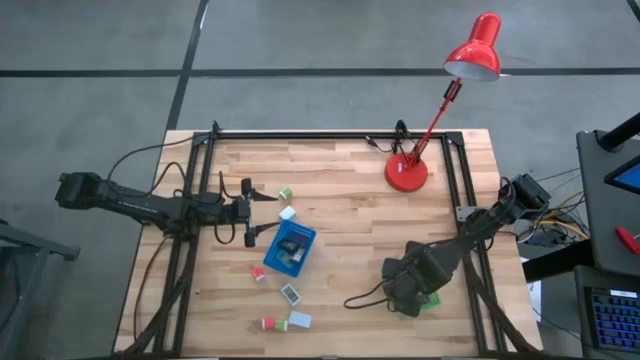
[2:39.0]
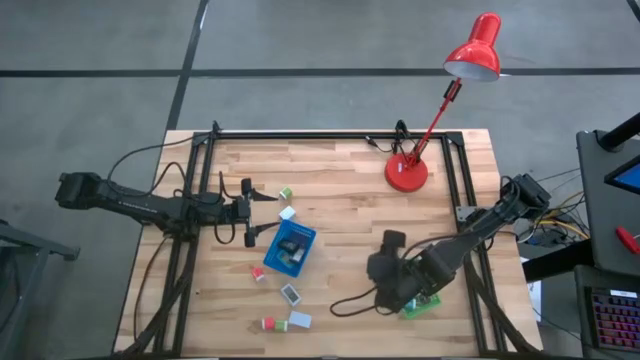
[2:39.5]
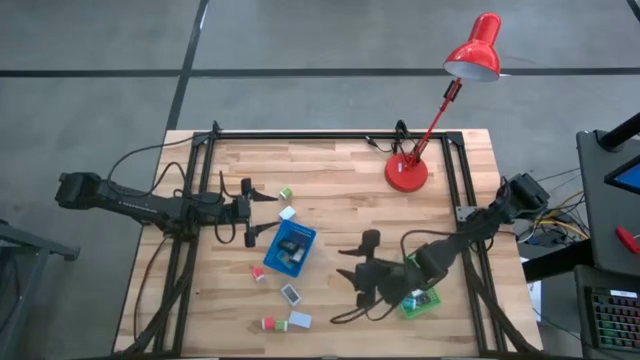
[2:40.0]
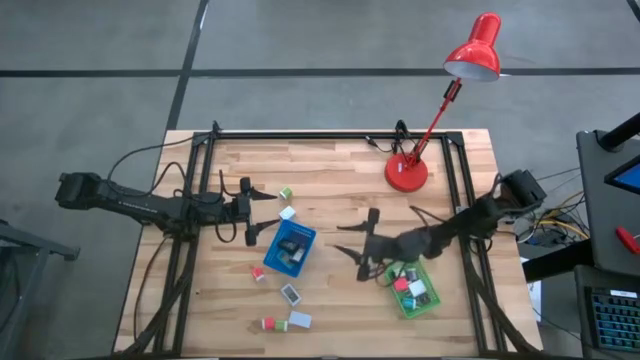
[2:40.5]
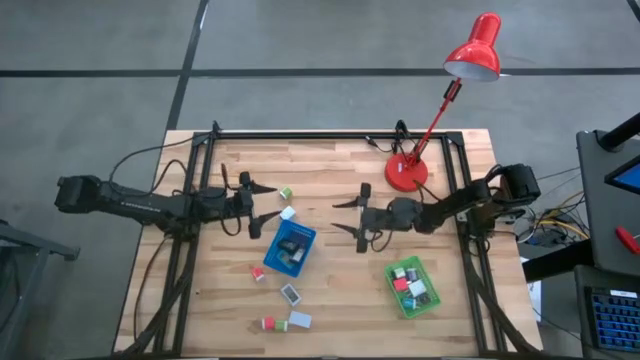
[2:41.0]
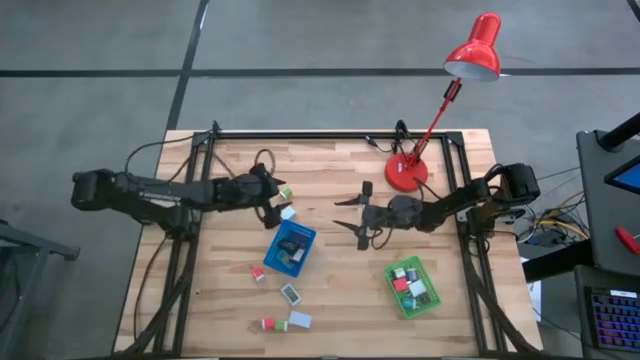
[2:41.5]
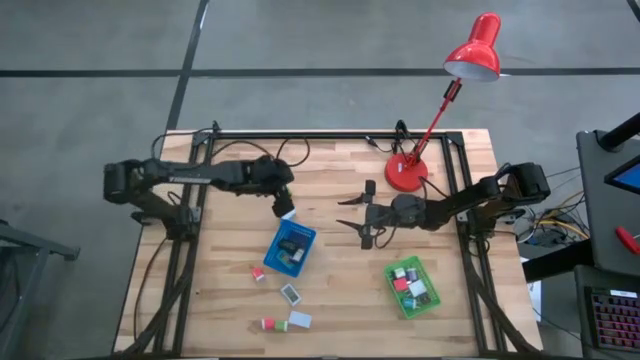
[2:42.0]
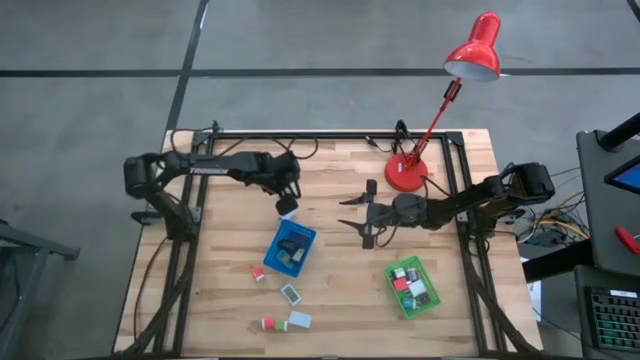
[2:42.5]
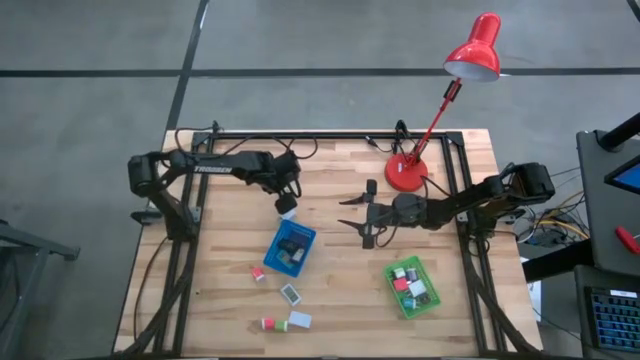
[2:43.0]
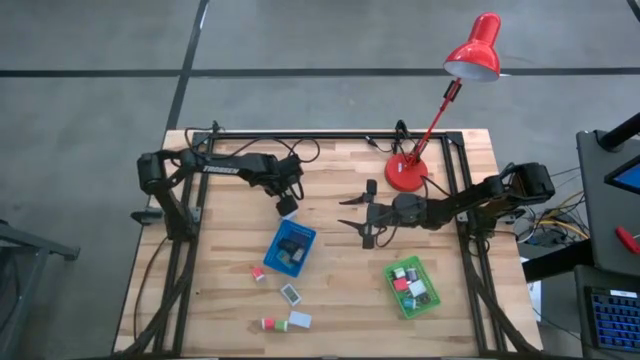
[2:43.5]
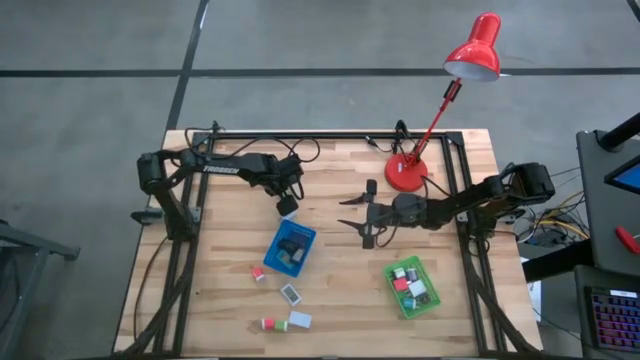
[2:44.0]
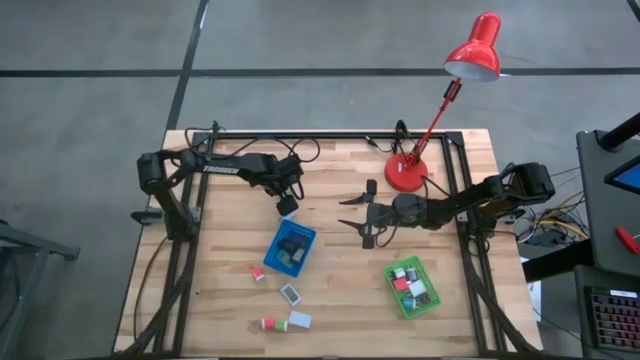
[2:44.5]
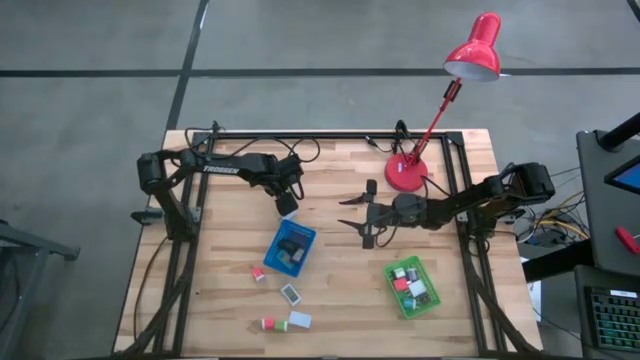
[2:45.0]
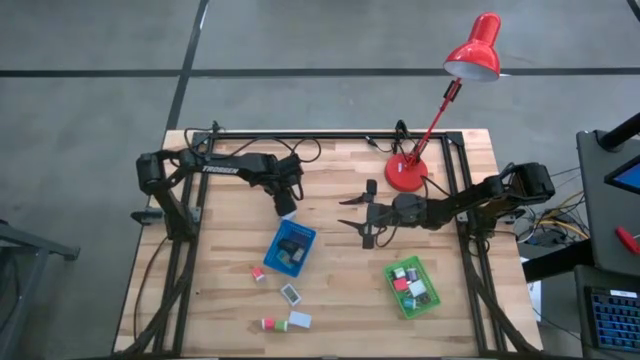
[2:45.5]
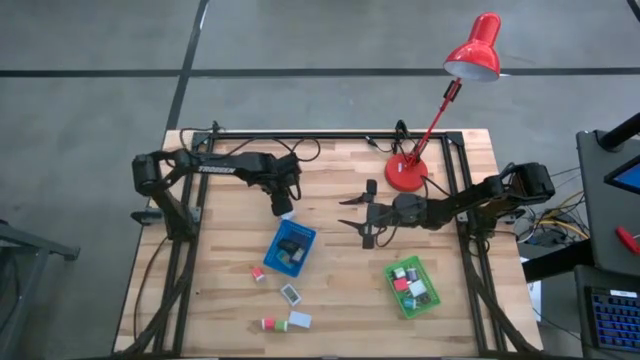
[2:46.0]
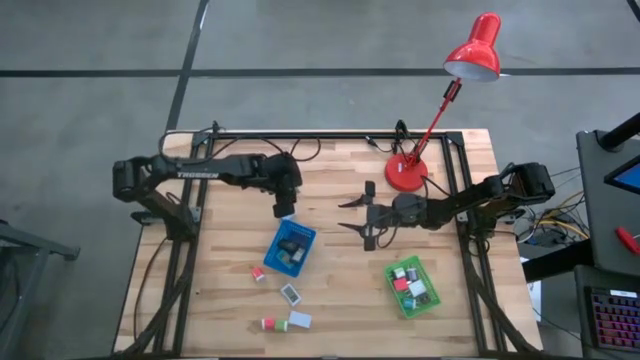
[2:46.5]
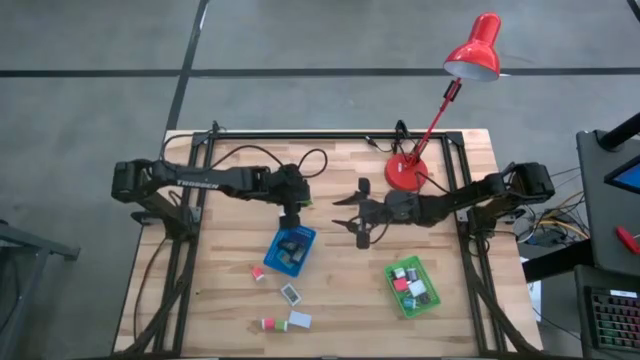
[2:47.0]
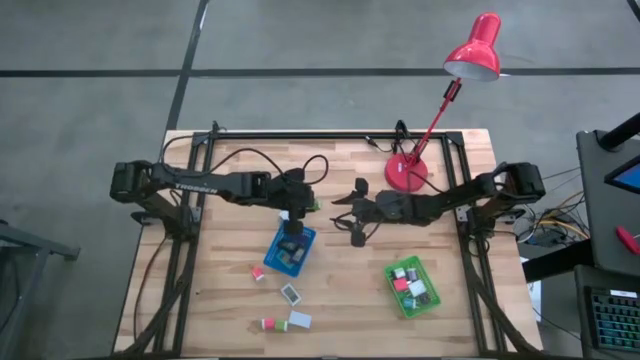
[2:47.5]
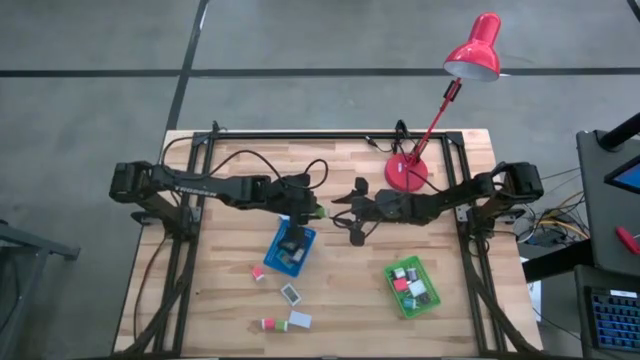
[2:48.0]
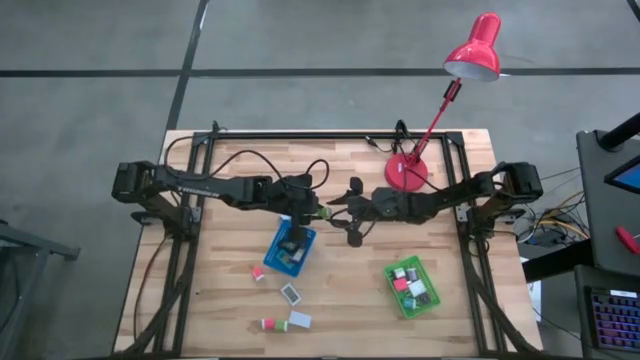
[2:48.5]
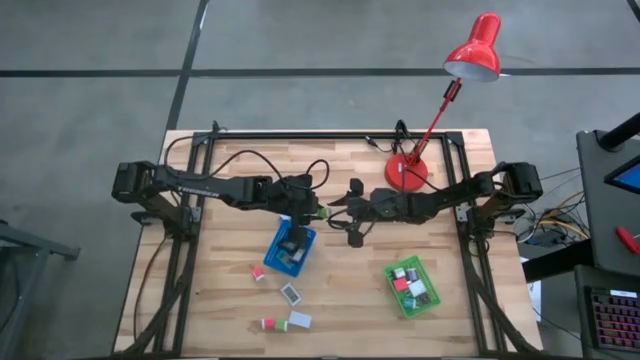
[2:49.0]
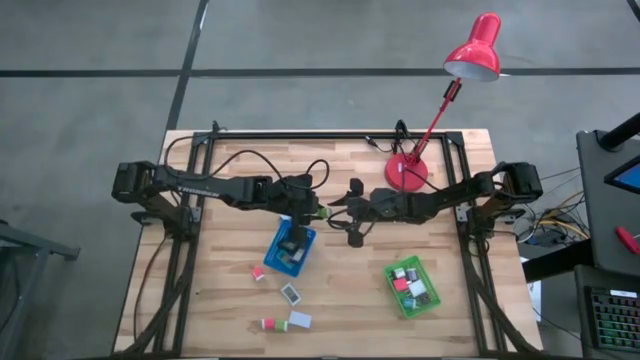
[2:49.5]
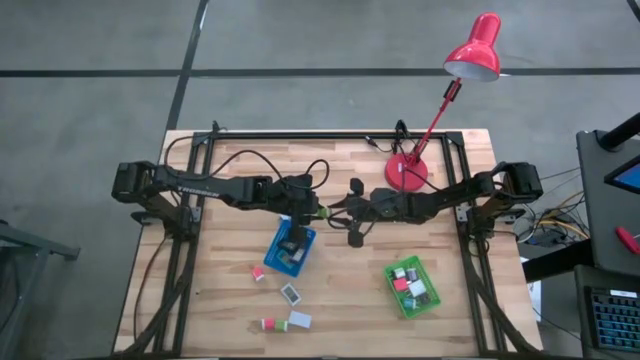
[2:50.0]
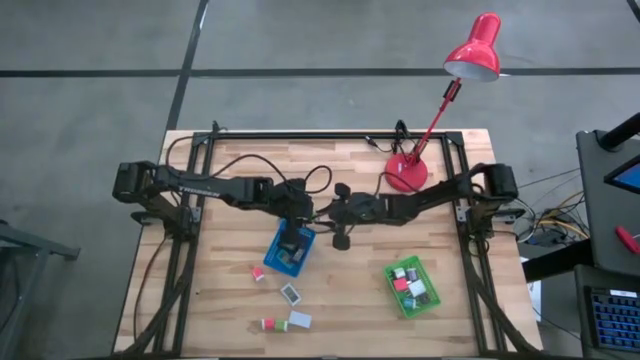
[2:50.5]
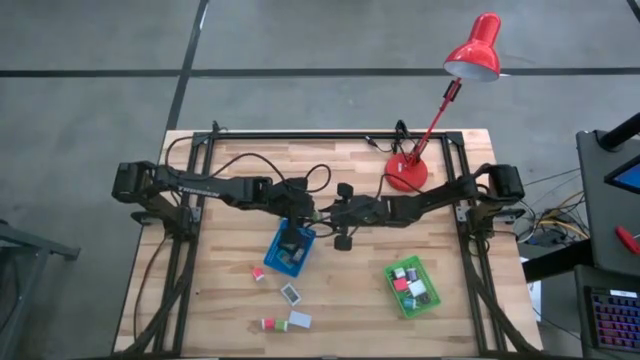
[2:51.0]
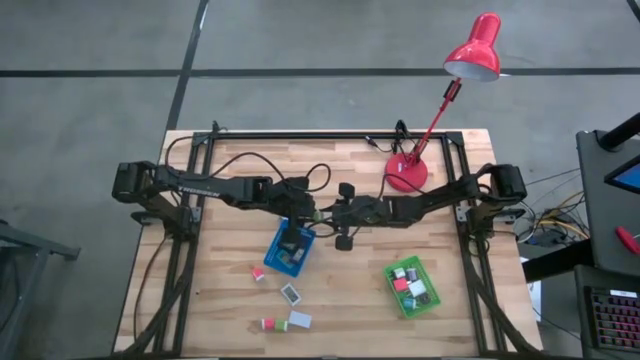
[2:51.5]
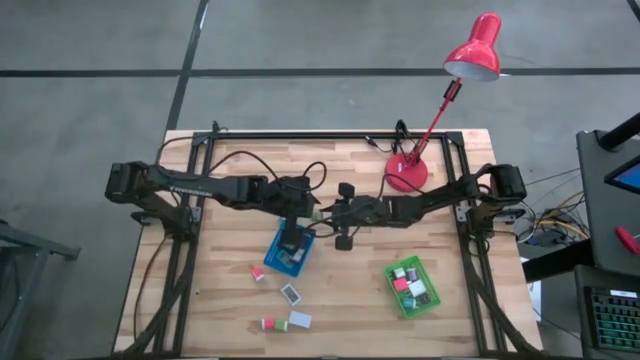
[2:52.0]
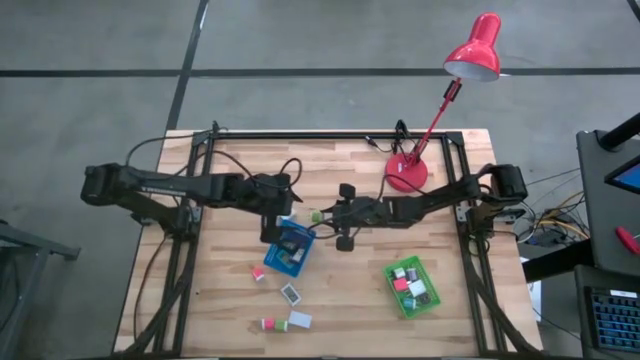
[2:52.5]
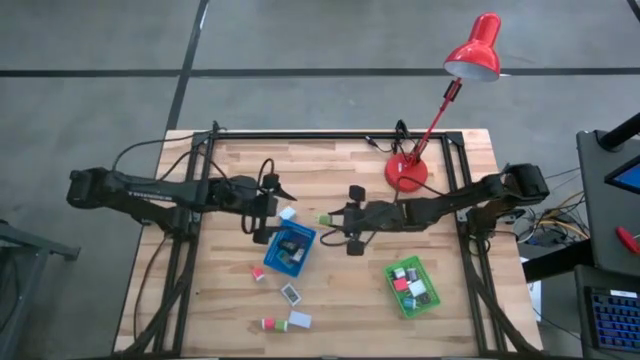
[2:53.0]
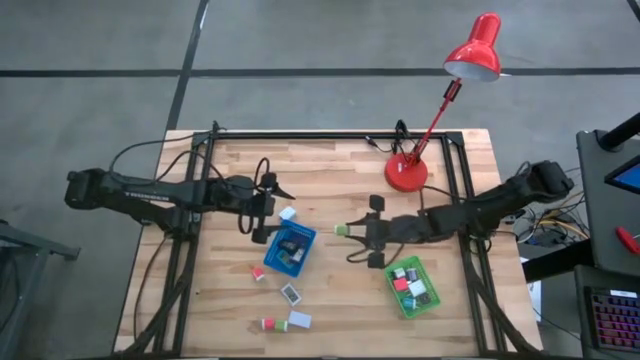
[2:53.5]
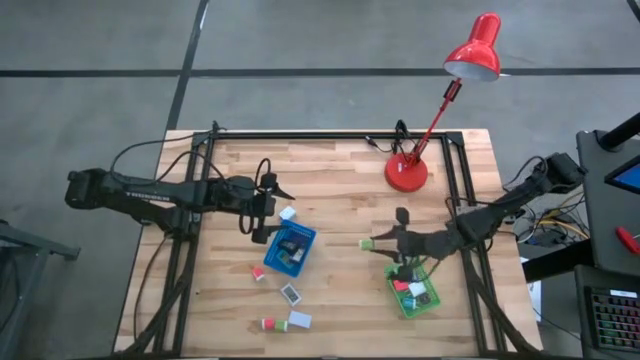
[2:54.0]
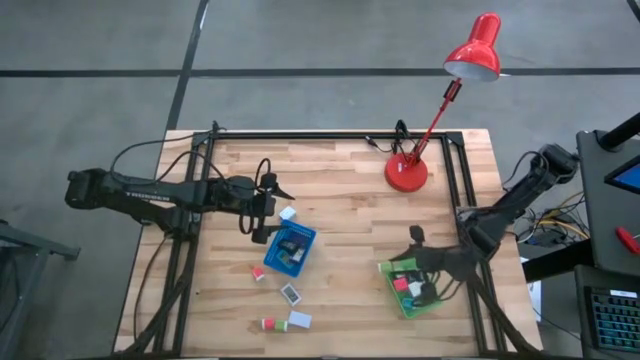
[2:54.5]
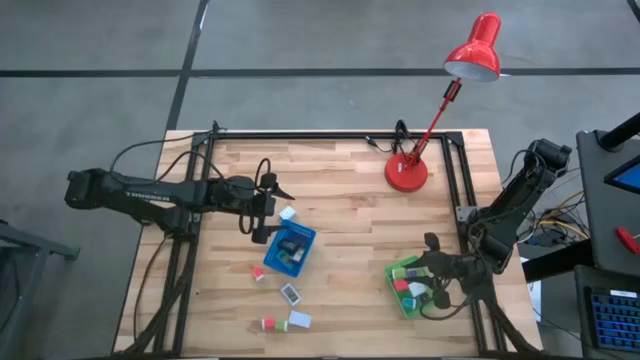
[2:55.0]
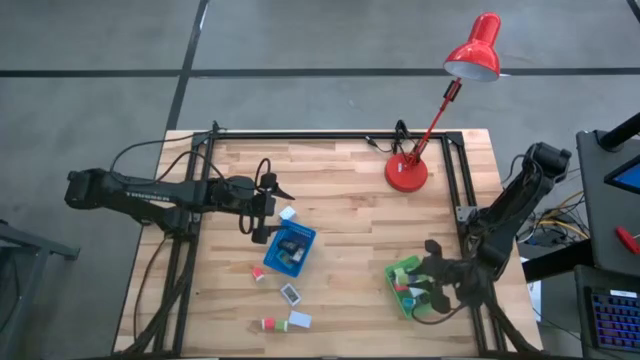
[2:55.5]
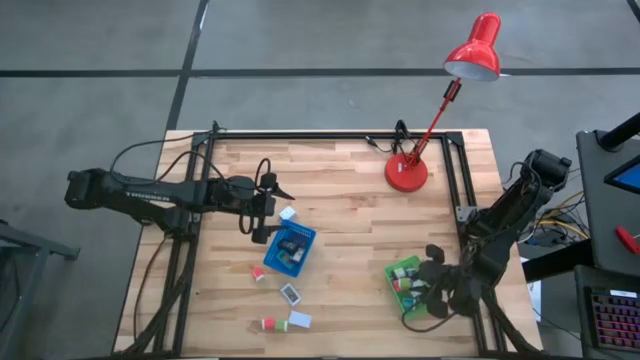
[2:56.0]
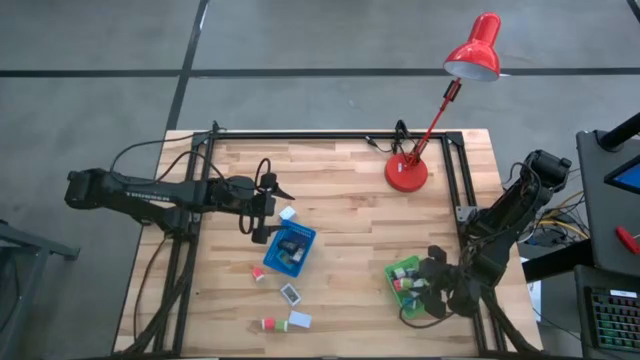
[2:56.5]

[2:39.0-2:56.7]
Task: Pick & Place Office items
Put the top green charger adapter into the green bin
